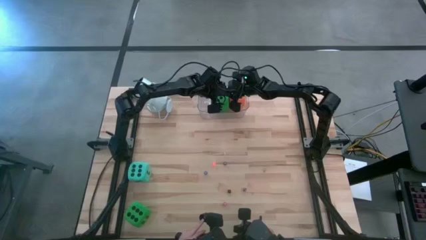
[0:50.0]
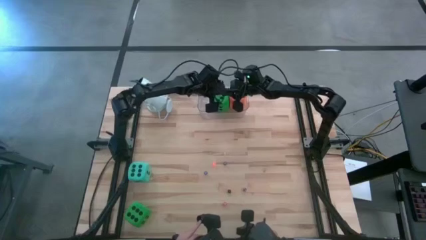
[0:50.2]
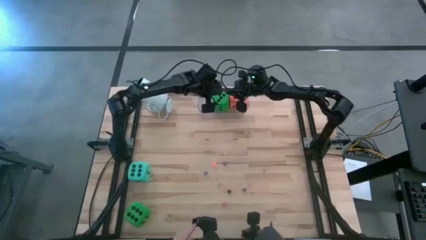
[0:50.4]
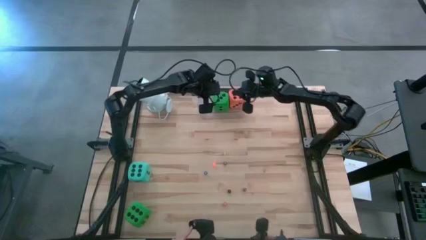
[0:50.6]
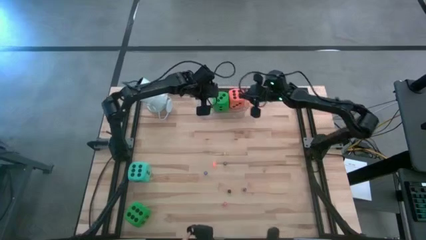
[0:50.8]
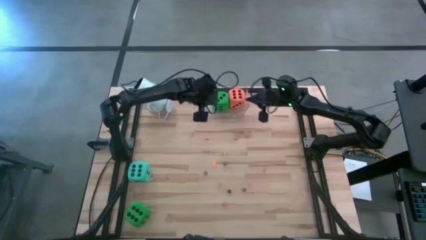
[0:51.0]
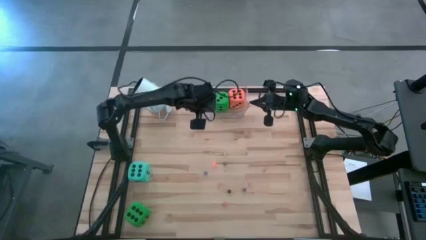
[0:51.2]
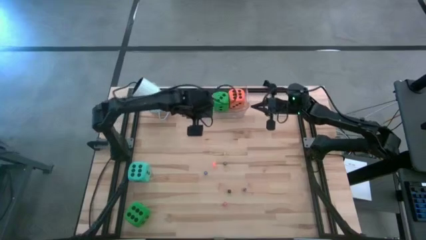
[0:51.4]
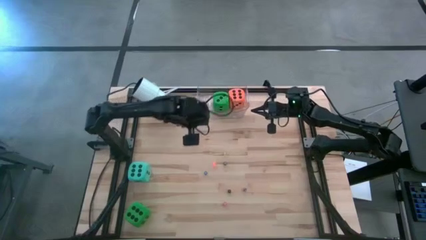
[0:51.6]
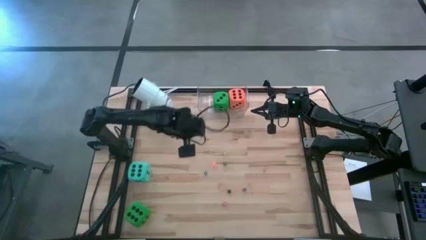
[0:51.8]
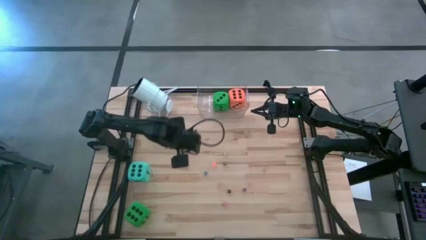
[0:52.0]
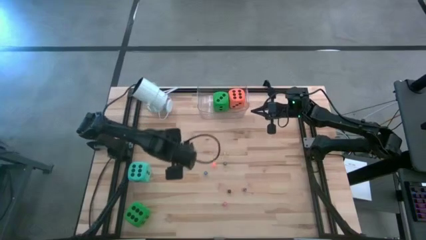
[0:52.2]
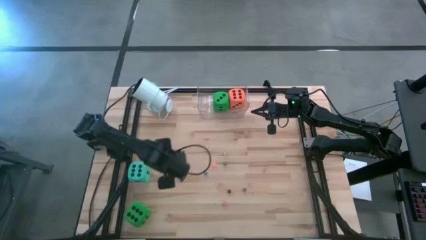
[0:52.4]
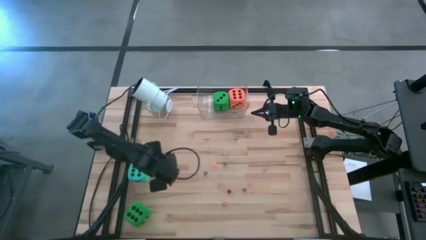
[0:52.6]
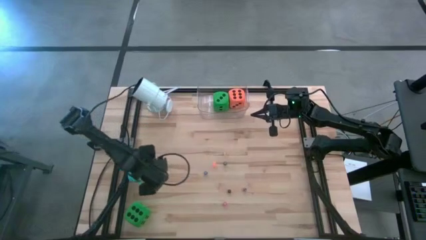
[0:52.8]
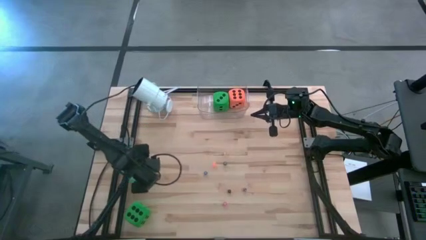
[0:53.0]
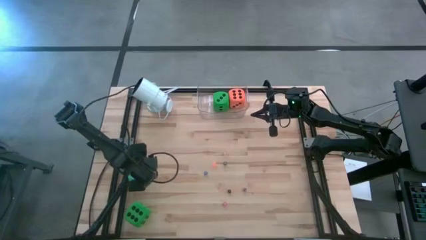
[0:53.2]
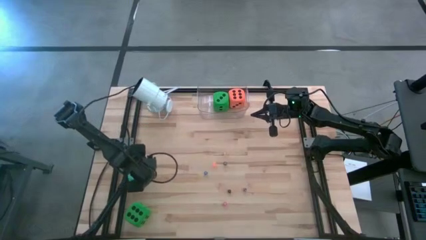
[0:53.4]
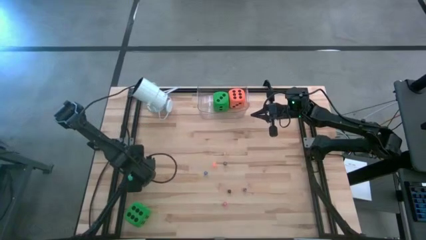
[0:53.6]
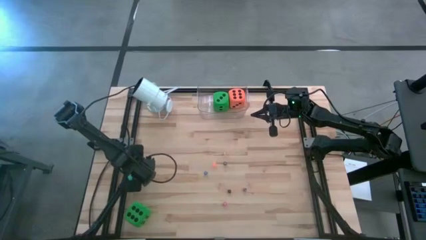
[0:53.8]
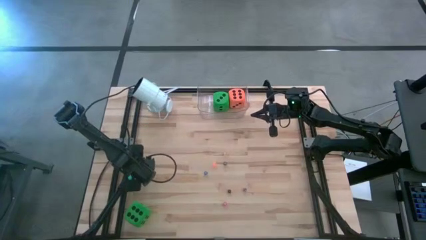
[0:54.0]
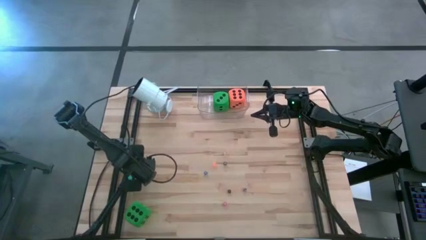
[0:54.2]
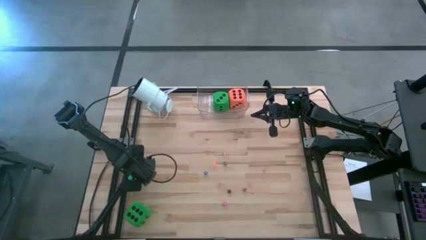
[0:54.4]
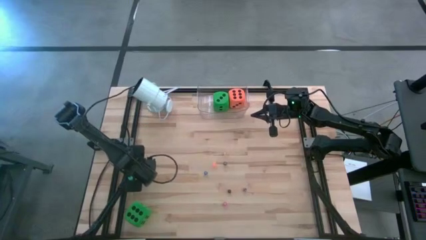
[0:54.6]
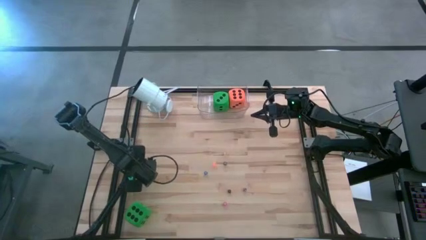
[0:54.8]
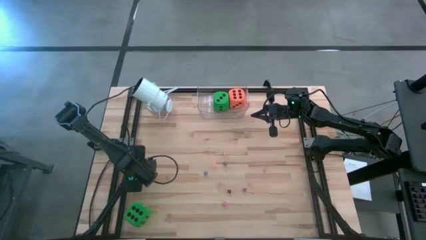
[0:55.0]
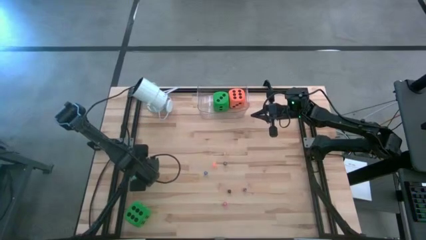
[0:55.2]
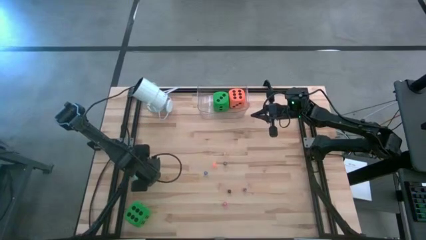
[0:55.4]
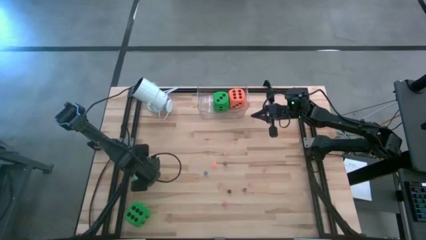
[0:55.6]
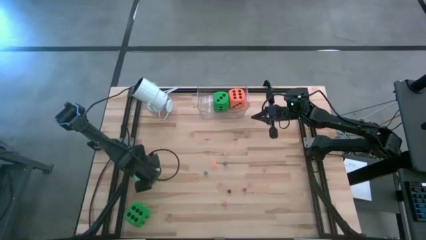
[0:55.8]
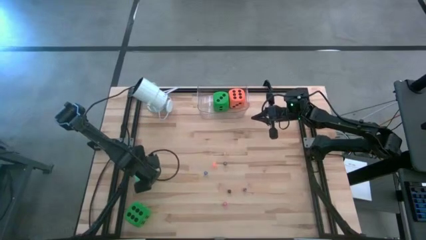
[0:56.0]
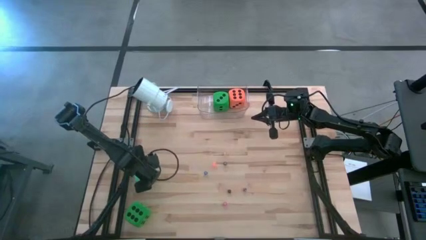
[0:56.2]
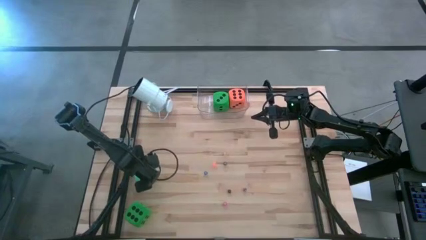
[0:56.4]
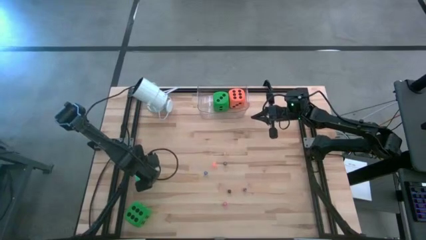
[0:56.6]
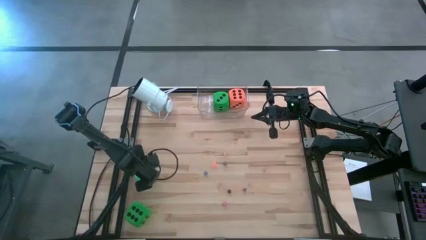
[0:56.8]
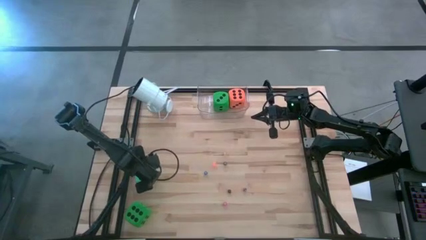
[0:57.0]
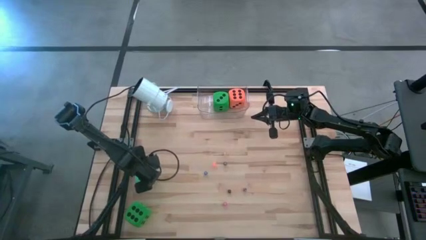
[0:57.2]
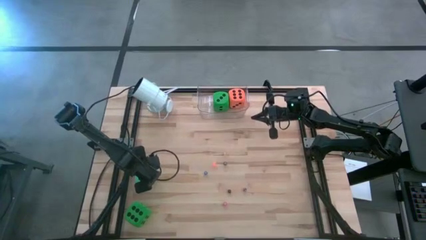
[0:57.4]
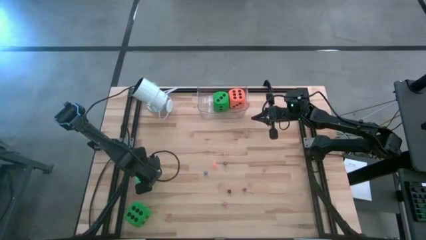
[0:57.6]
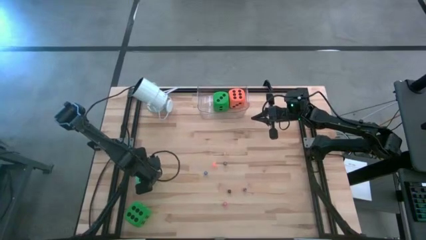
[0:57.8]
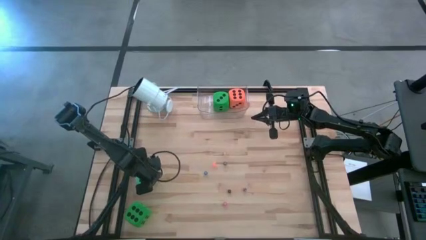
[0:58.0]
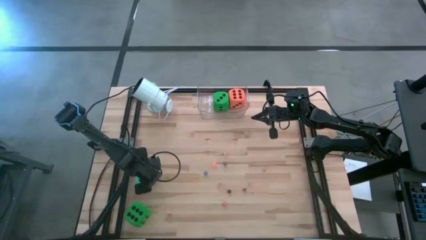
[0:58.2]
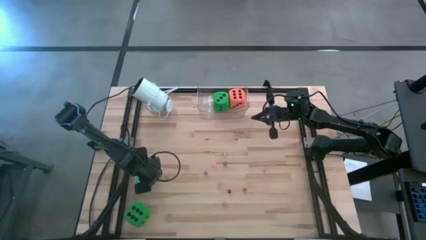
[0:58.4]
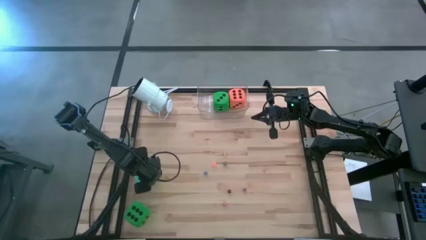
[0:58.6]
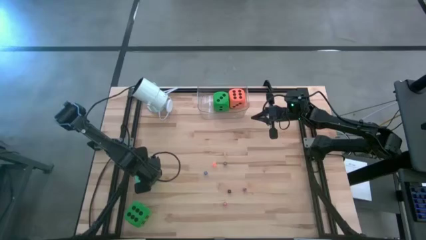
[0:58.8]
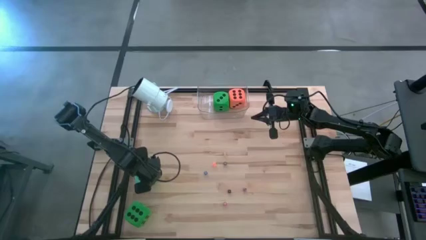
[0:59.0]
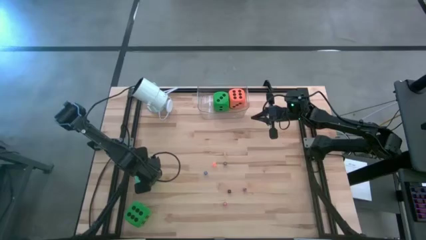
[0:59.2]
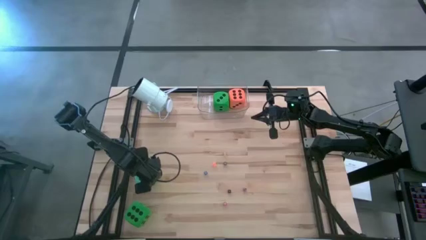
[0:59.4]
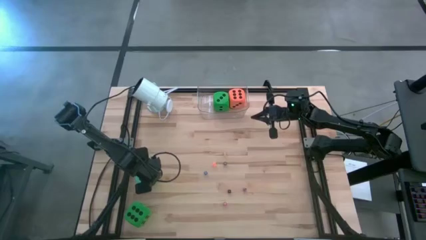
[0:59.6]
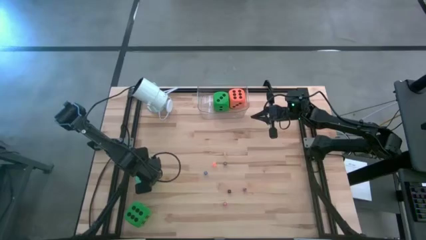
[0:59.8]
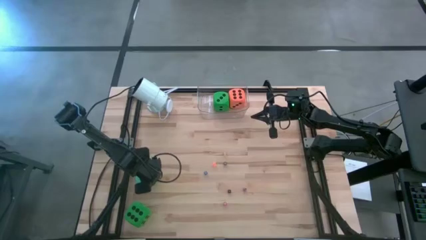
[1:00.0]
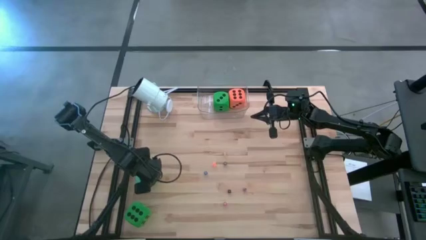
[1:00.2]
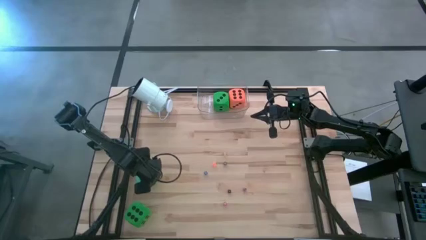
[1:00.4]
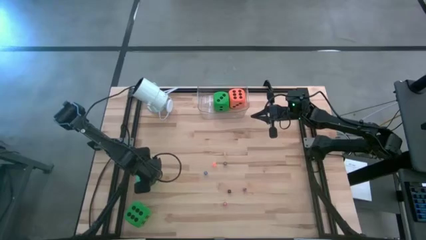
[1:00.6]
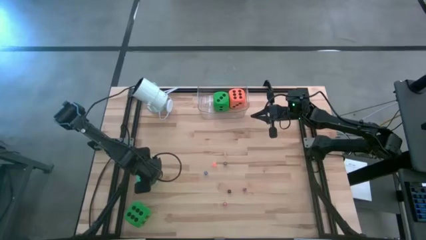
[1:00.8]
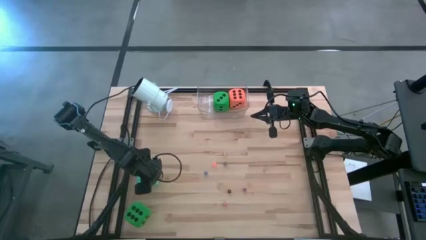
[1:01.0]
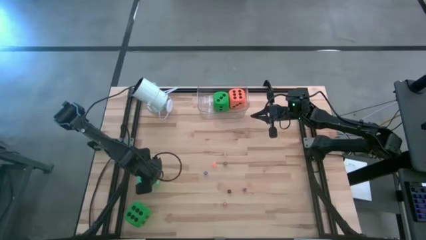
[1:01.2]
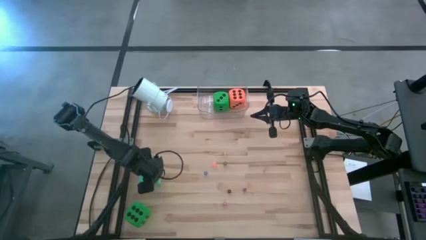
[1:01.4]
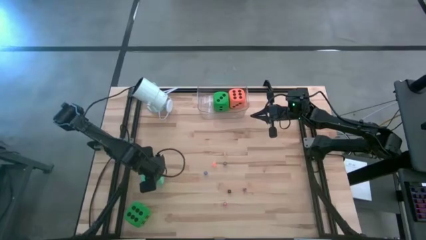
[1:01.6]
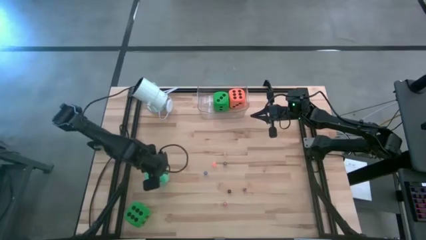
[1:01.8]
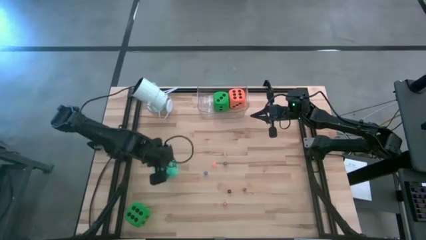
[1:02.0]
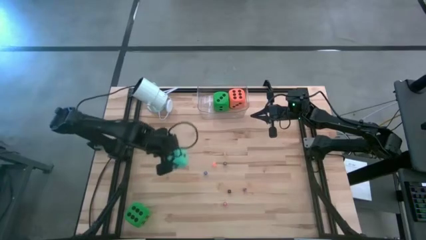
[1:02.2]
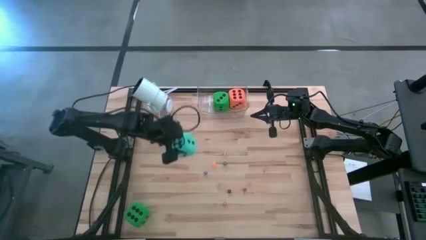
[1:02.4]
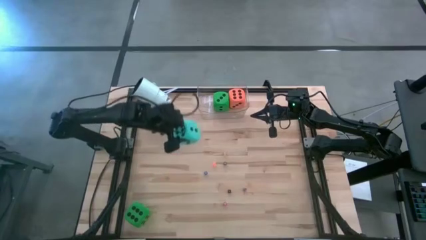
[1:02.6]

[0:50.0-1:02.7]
Task: Pick & Place Dice
Put the big blue dice into the transparent bin

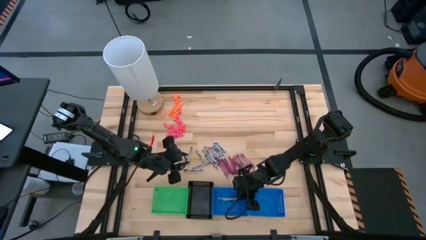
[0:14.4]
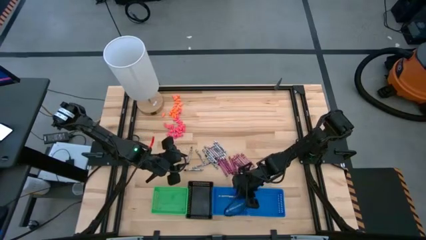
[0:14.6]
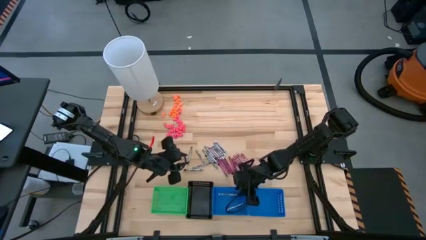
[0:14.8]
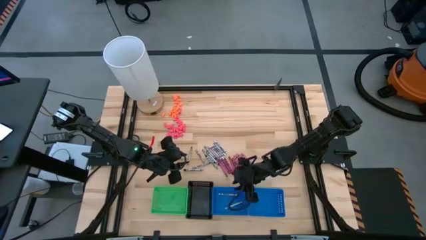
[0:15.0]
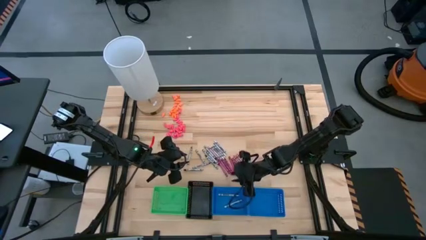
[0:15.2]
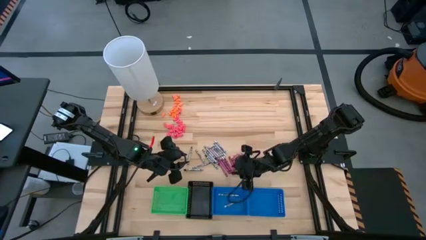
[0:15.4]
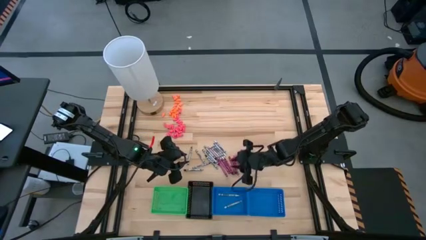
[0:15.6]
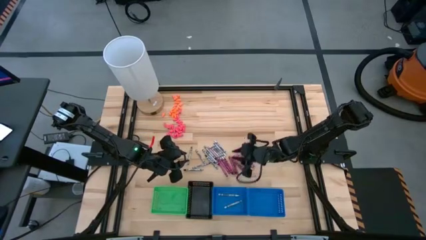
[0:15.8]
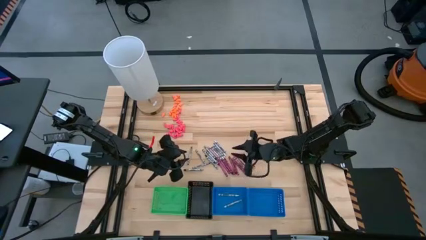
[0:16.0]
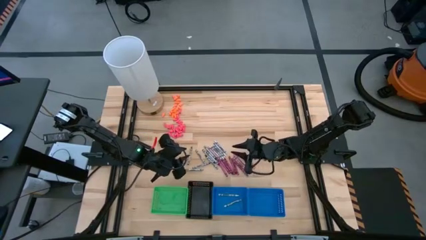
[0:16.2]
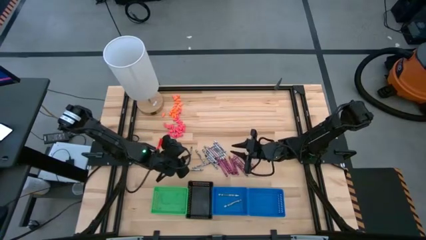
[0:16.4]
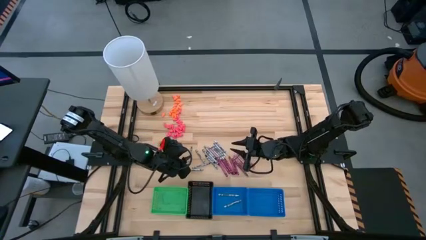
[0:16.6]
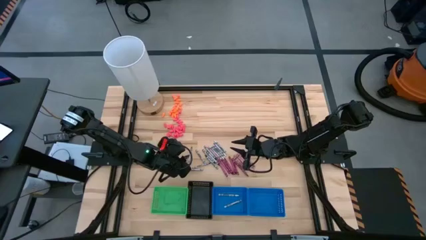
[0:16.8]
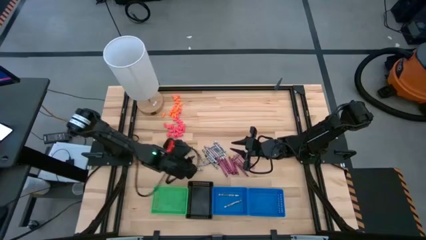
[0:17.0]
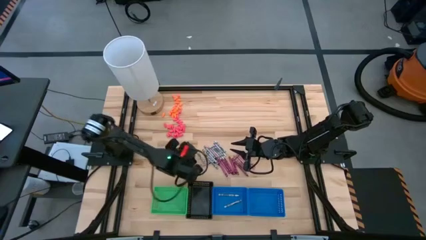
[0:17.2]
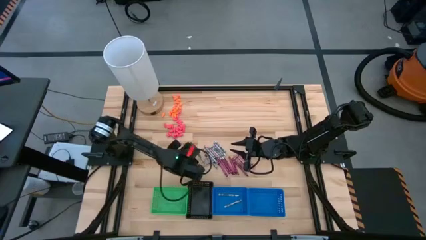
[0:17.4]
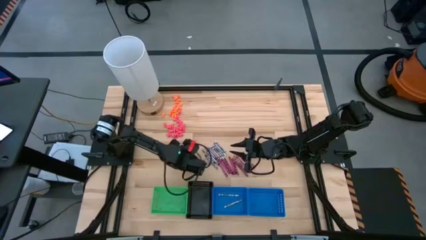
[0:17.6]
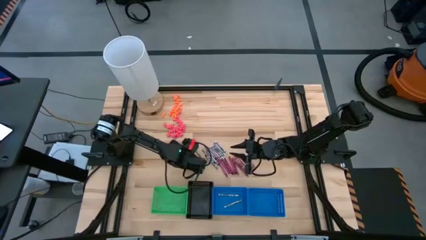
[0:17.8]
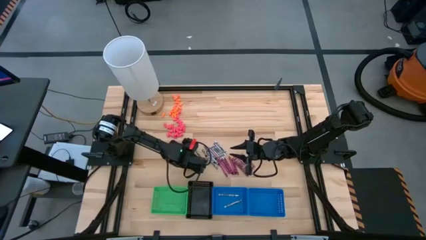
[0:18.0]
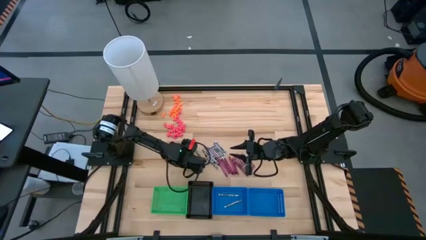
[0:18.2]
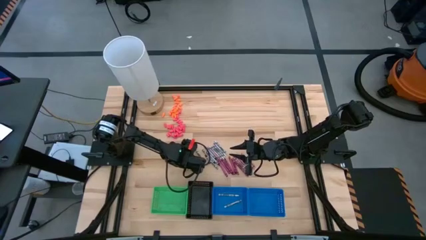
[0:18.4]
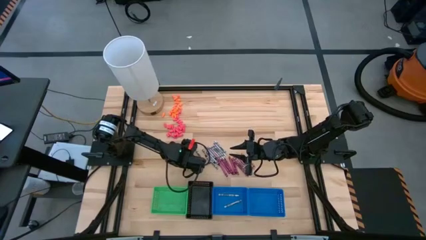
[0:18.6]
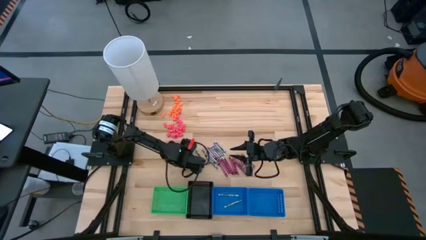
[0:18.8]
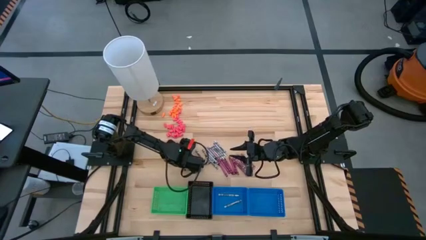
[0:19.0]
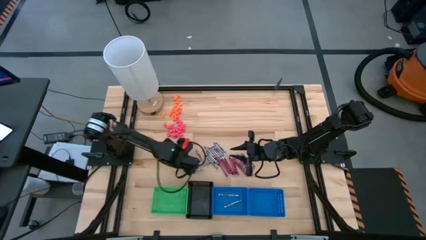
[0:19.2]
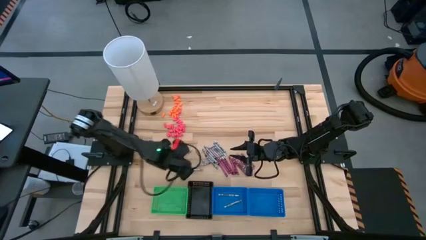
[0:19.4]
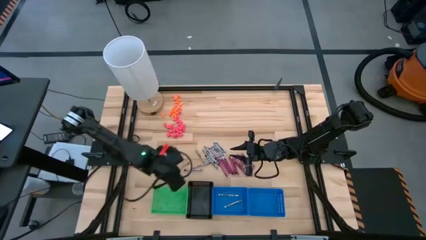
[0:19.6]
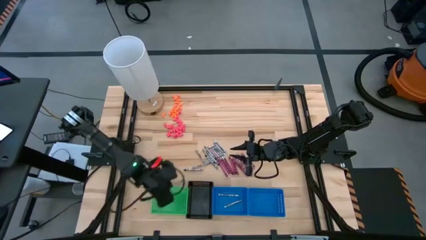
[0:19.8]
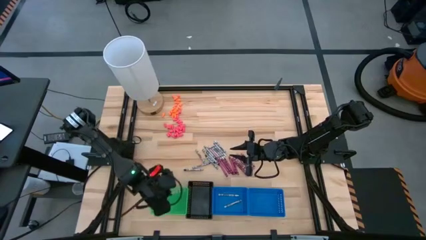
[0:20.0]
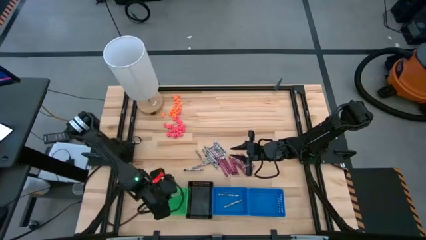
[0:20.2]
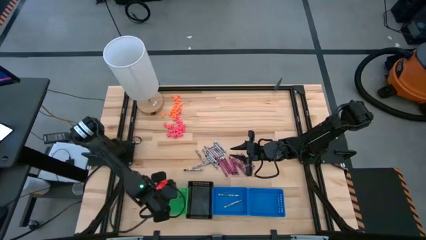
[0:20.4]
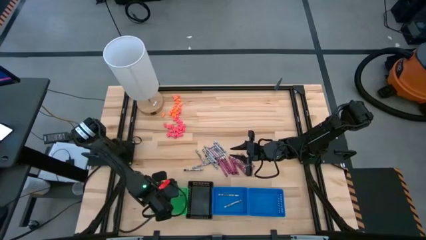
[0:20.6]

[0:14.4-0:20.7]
Task: Sort crayons
Put the black crayon into the green bin
